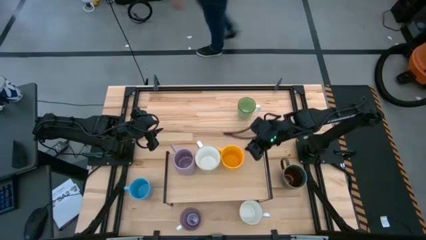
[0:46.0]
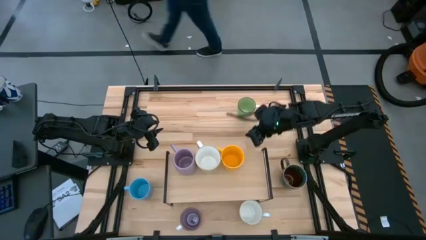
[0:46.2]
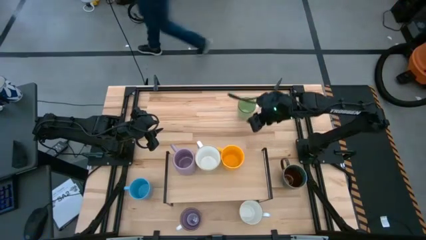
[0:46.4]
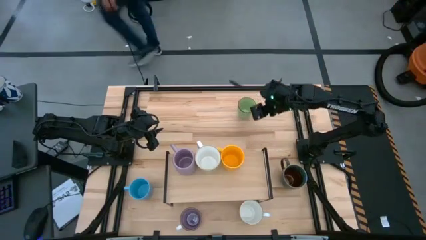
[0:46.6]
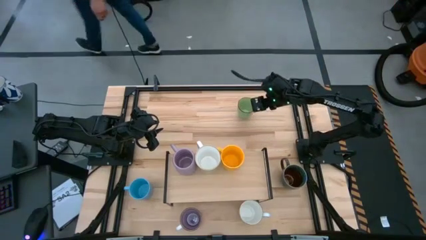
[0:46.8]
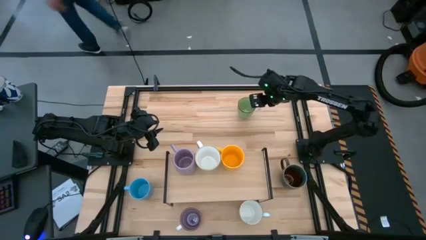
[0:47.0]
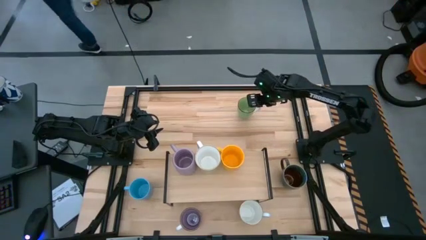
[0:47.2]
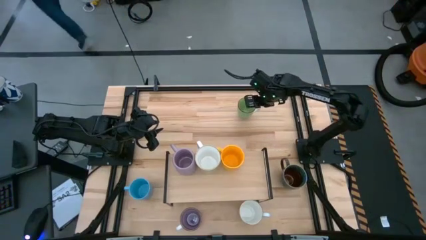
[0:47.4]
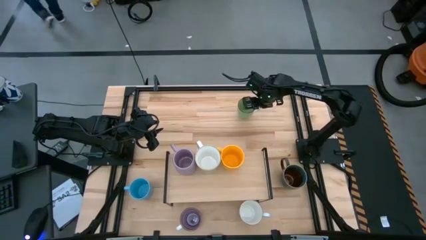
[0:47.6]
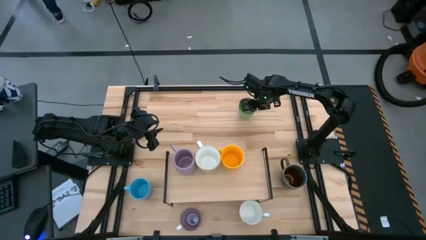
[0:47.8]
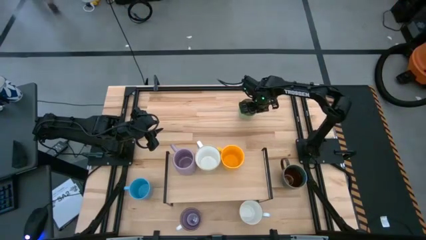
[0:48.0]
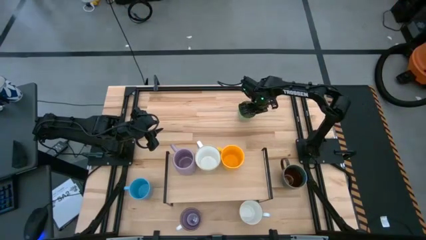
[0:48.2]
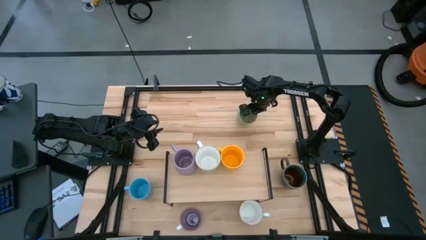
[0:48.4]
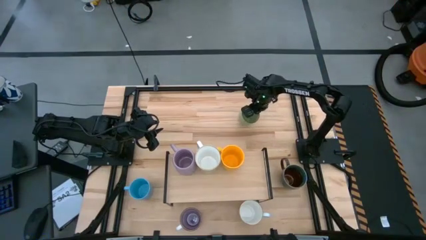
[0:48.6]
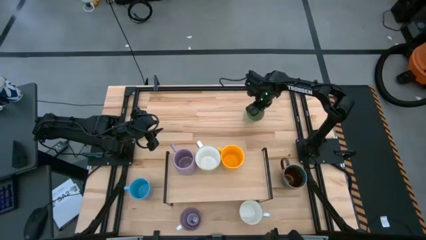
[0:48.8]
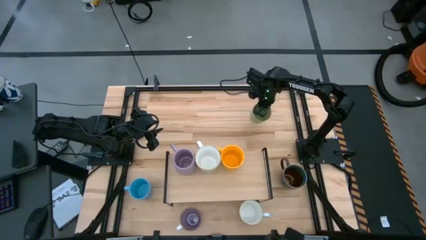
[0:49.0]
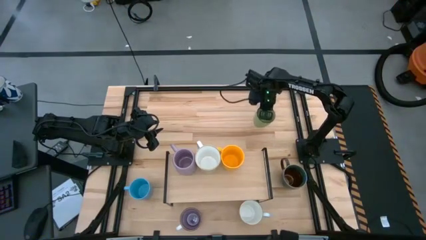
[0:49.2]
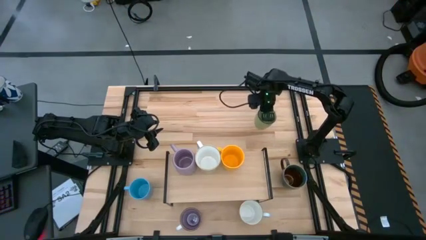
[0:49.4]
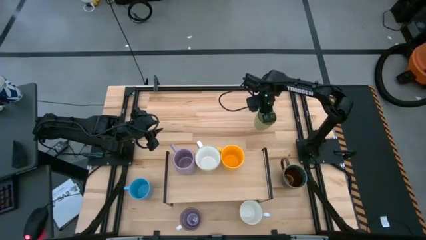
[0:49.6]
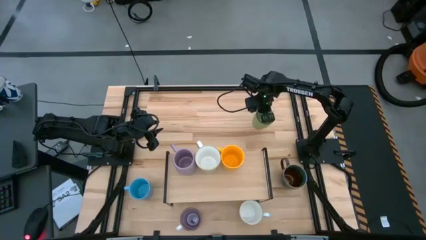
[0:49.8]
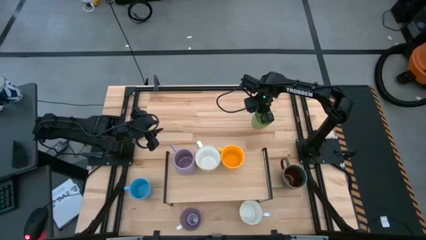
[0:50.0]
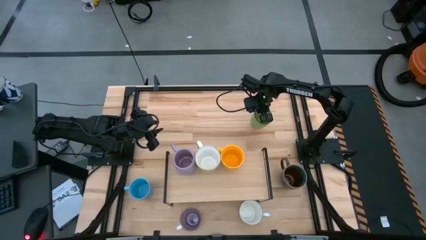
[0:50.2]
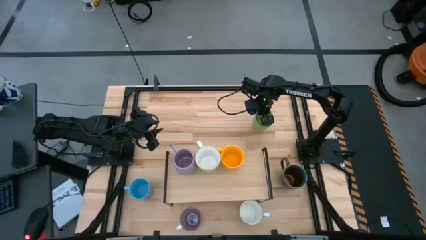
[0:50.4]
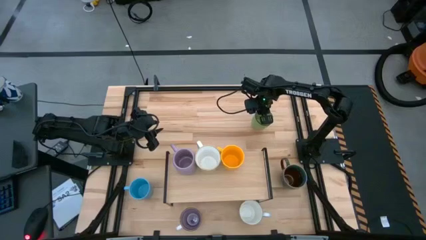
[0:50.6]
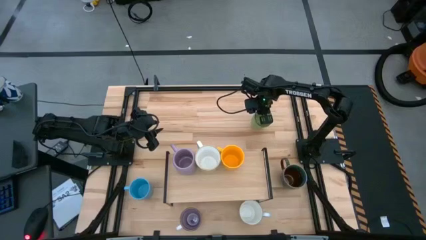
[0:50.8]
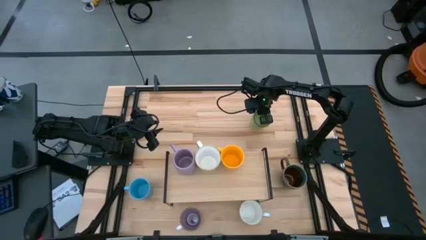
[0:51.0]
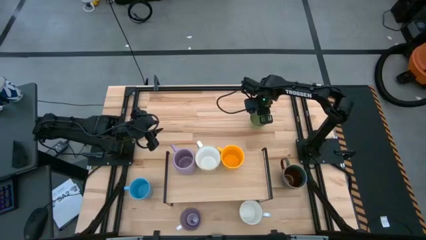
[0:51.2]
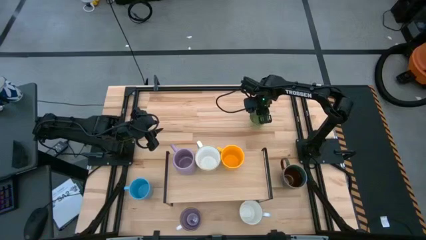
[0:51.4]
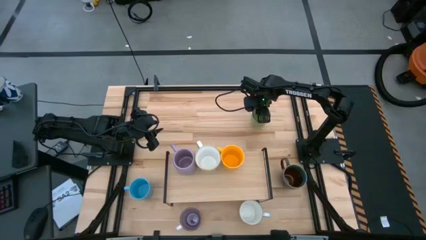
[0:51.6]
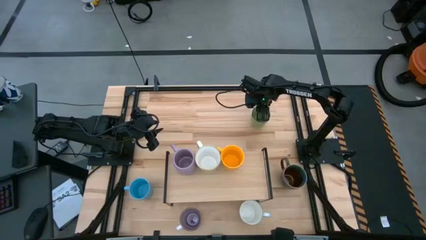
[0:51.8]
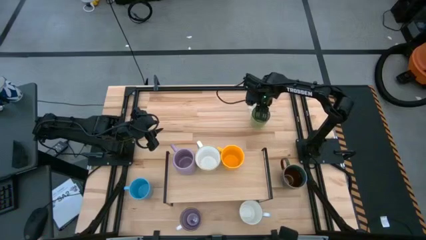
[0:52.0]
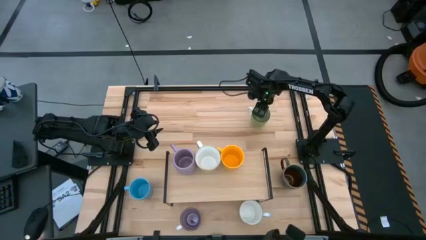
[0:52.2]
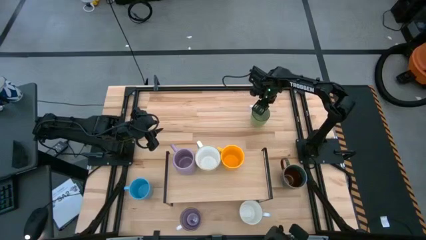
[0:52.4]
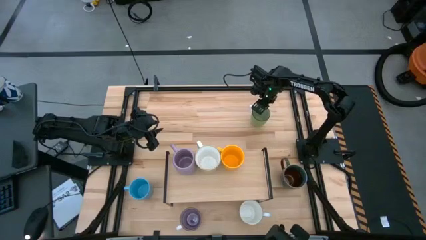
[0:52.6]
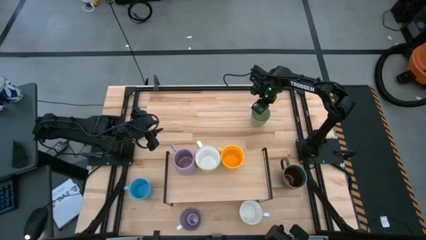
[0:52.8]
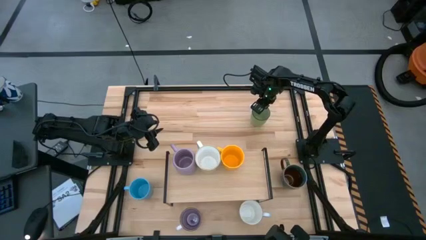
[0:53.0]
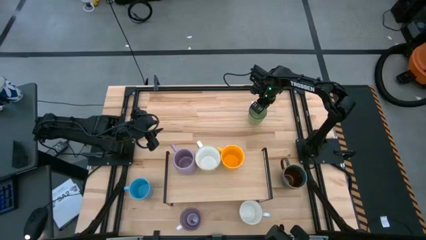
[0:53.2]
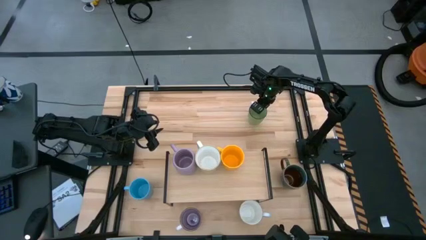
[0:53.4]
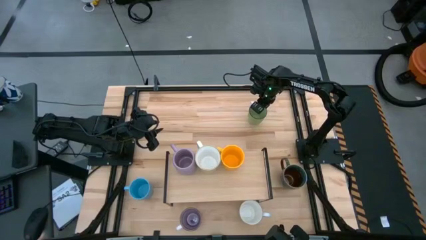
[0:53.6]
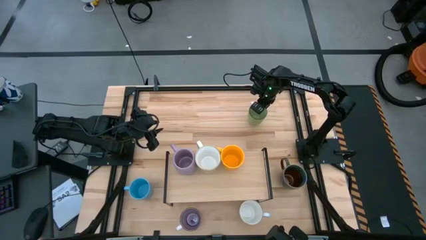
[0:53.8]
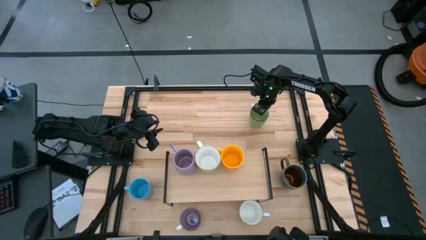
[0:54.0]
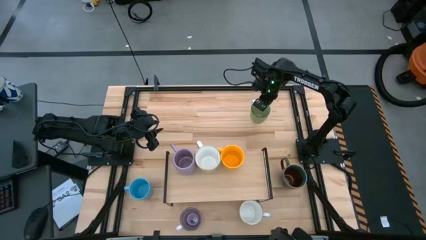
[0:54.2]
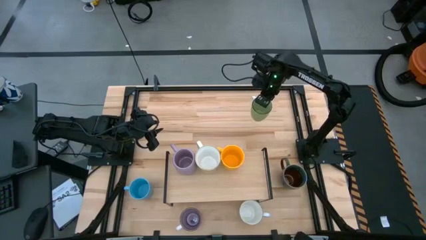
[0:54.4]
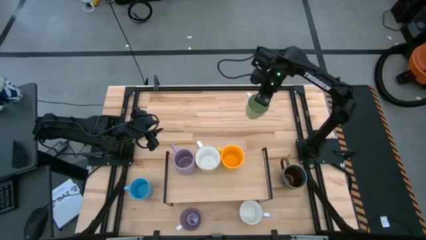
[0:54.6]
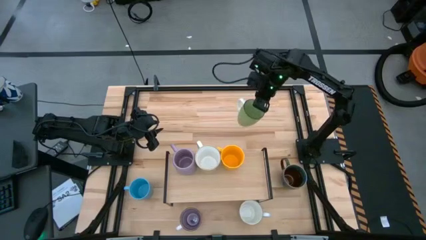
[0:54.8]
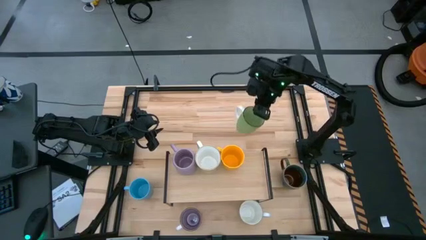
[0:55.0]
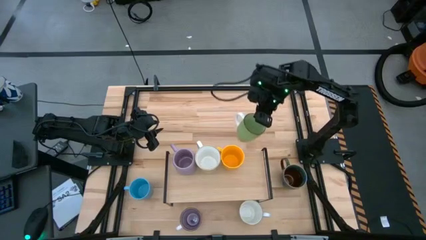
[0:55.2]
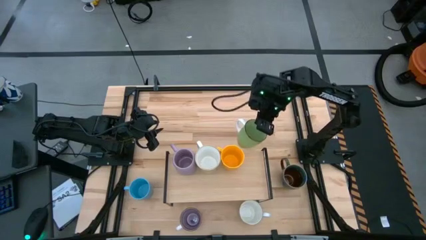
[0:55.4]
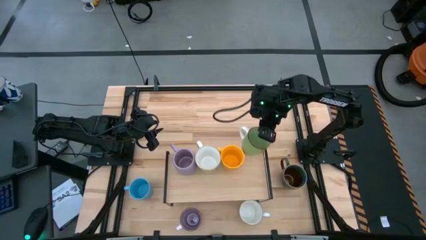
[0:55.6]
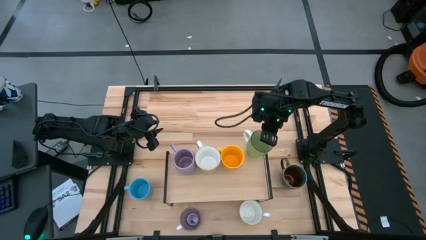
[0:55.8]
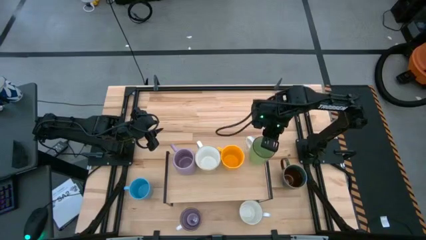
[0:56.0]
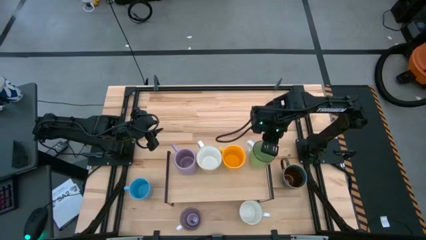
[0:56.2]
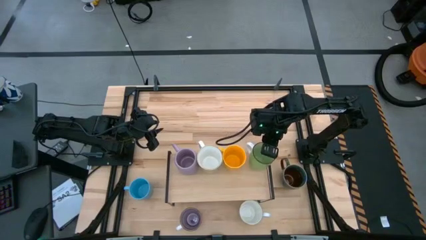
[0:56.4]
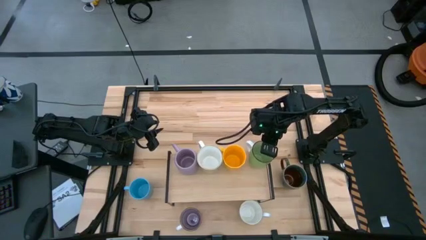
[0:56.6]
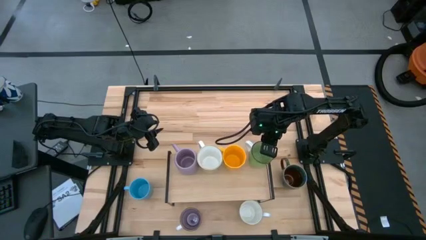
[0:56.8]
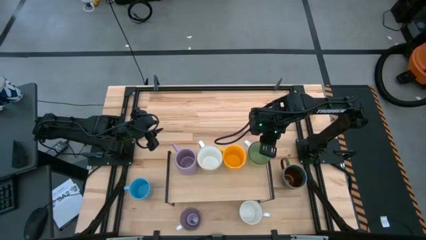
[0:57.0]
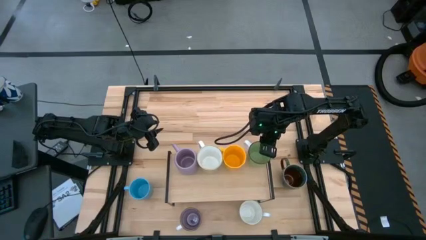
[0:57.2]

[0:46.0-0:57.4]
Task: Place coffee mugs
Put the green mug on the shelf

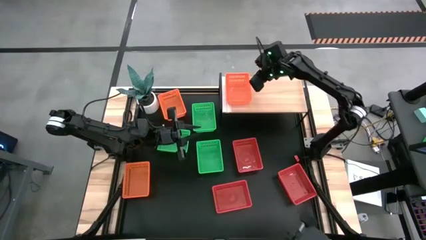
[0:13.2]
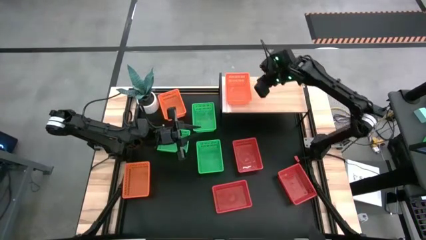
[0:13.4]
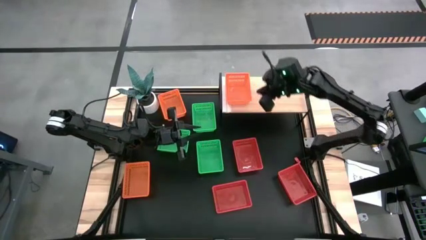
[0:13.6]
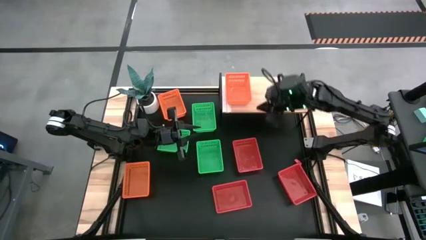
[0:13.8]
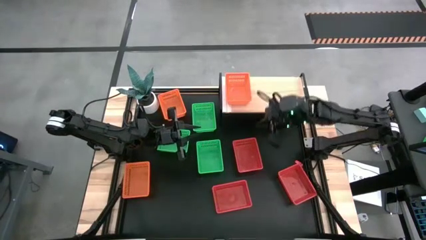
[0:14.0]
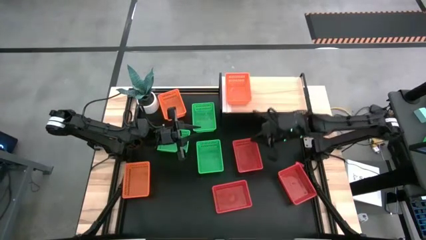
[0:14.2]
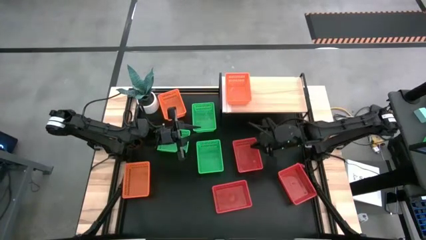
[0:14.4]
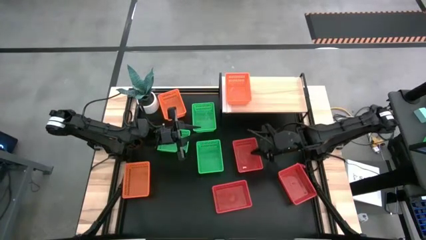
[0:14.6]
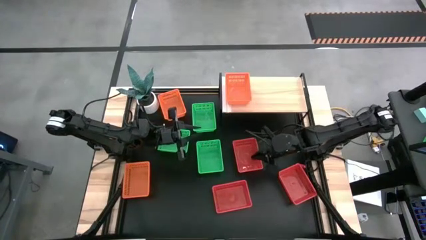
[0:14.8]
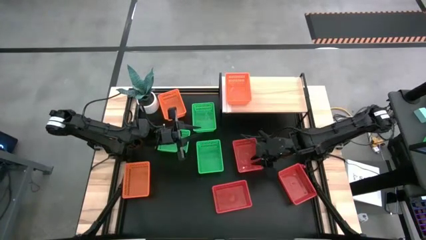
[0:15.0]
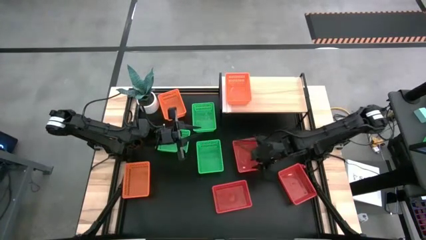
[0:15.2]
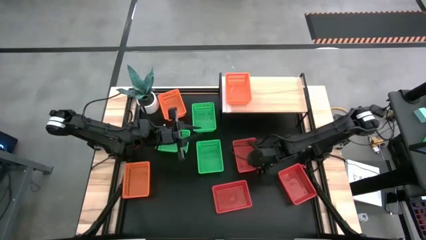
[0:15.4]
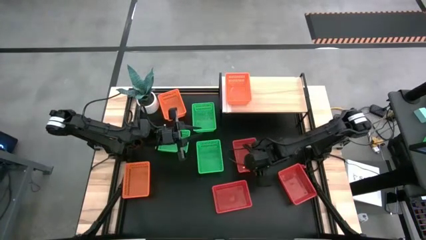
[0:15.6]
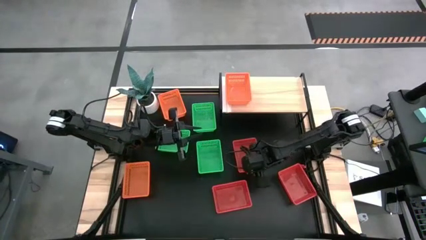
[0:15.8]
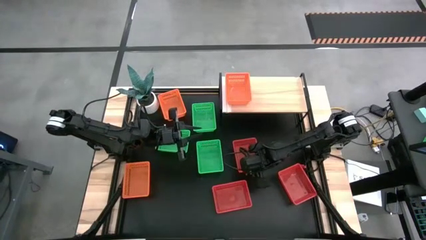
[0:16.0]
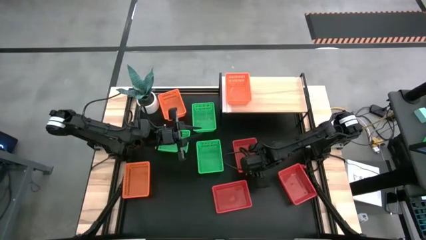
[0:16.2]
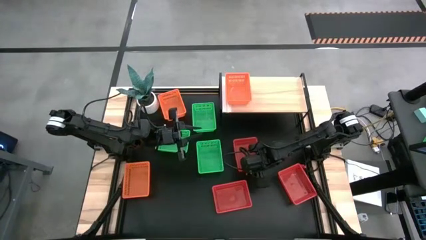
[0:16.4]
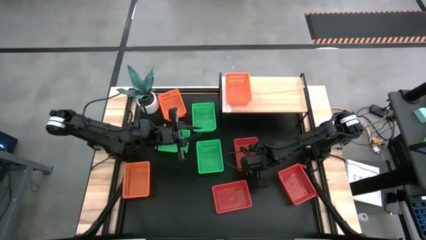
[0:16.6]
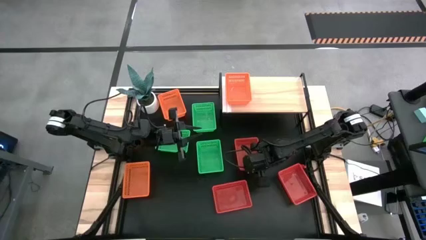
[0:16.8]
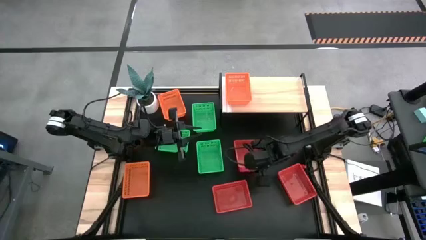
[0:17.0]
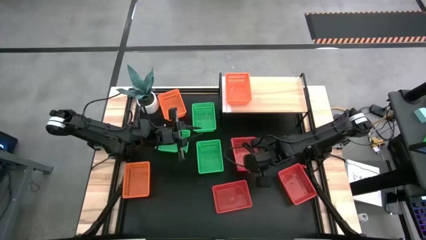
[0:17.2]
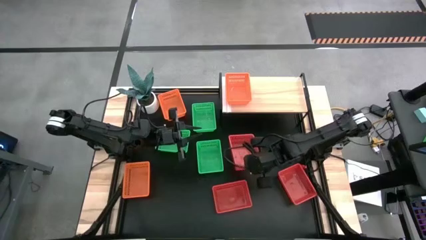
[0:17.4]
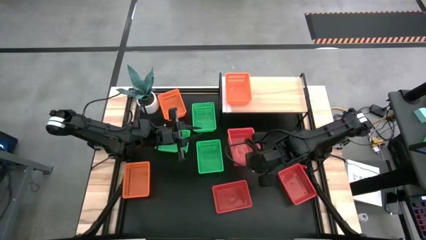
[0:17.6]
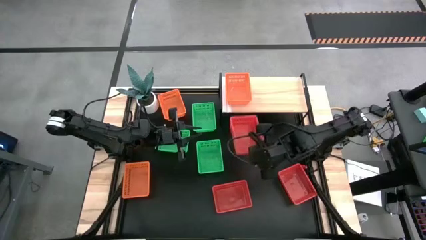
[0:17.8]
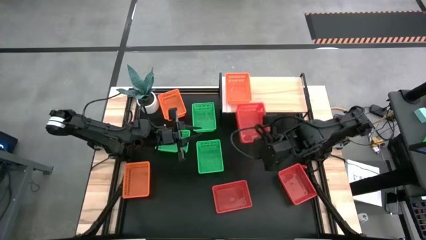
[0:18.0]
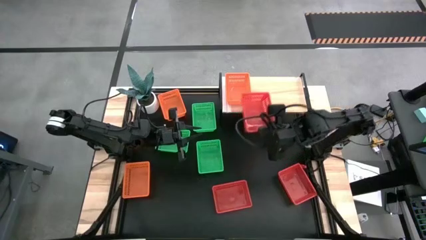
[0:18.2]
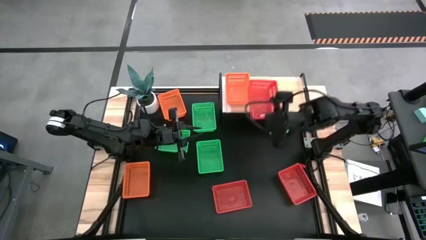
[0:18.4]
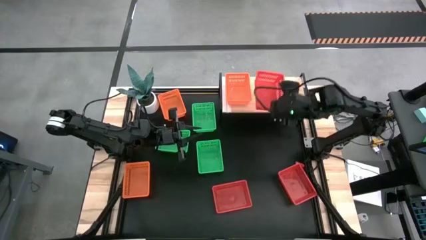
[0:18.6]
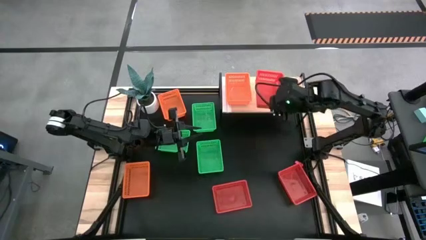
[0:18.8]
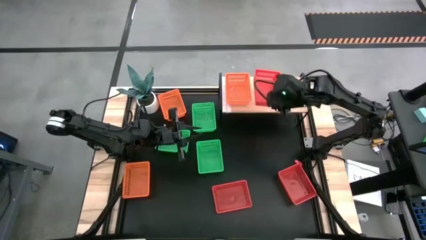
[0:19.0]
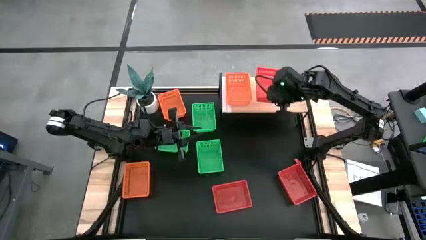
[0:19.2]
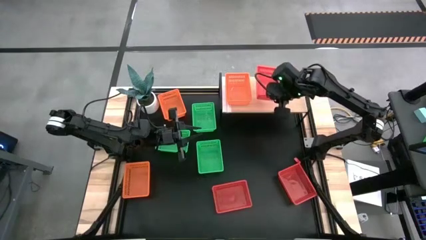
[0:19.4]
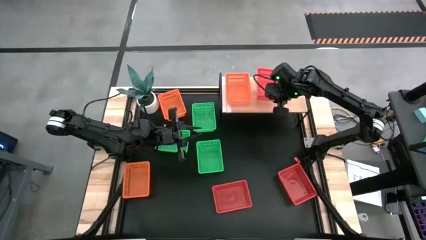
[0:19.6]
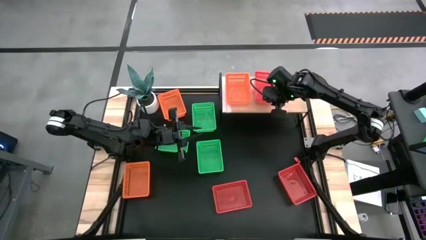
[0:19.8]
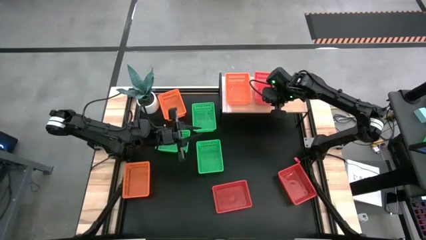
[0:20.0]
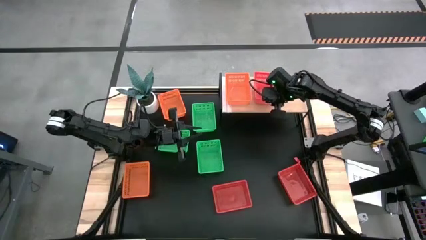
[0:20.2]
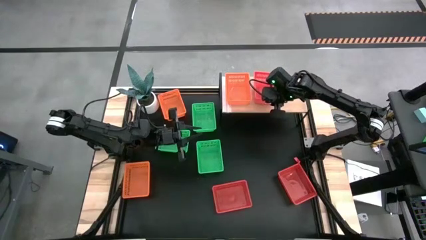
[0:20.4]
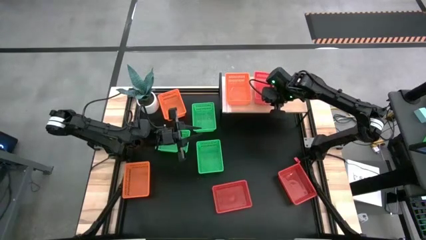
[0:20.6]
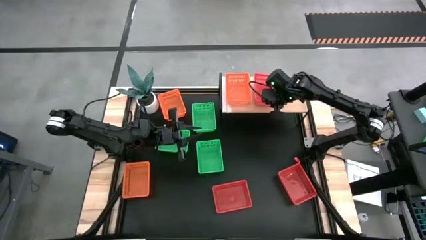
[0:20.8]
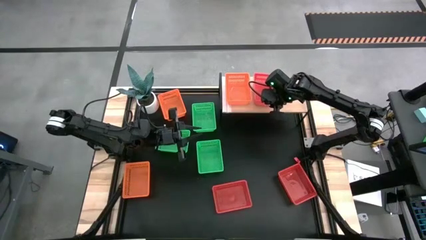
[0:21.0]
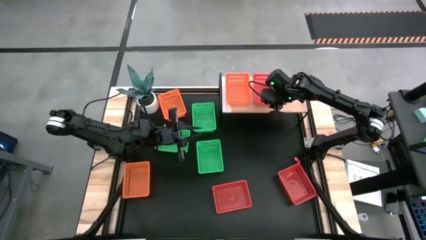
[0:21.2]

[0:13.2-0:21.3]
Task: Stack baskets on shelf by color
Put the top left red bin on the shelf
